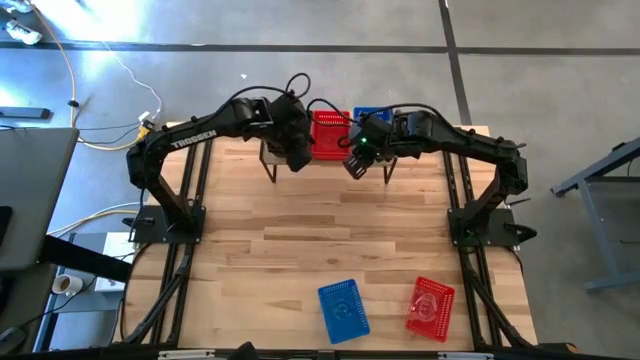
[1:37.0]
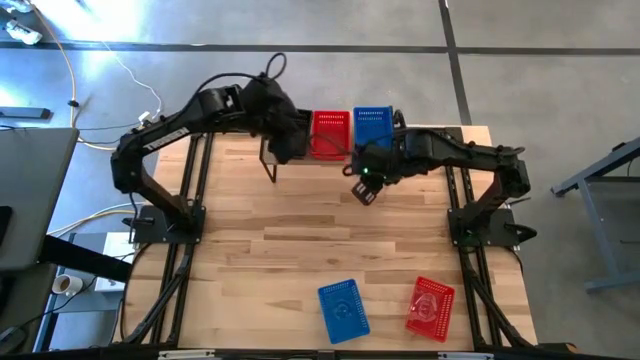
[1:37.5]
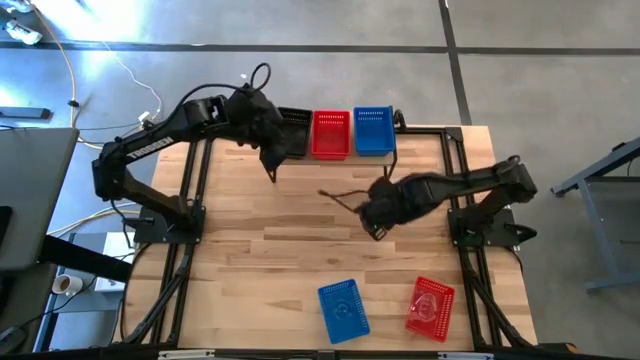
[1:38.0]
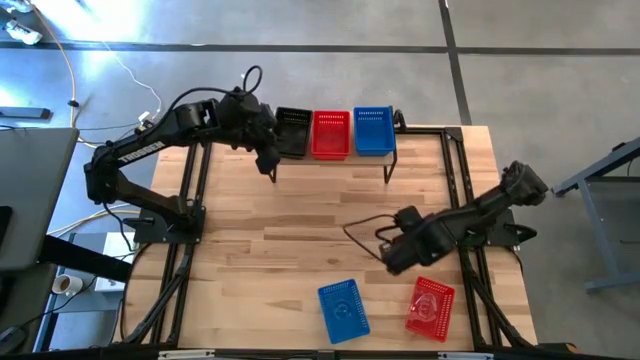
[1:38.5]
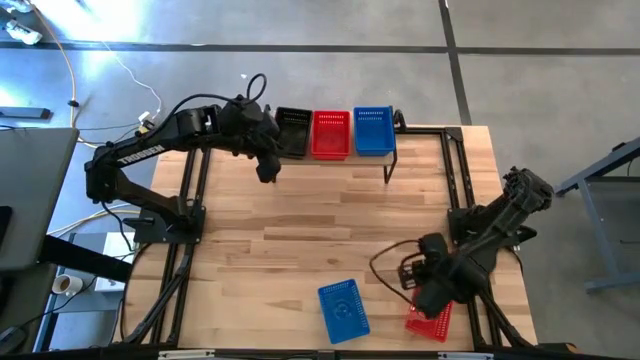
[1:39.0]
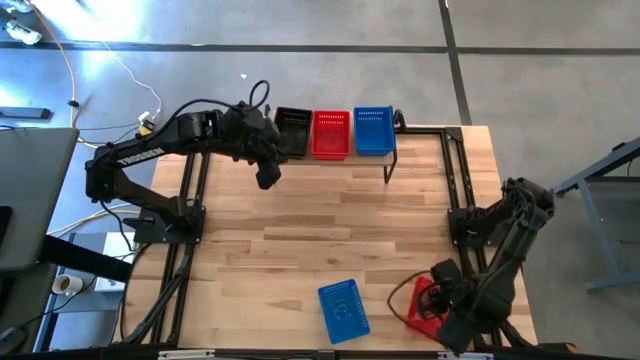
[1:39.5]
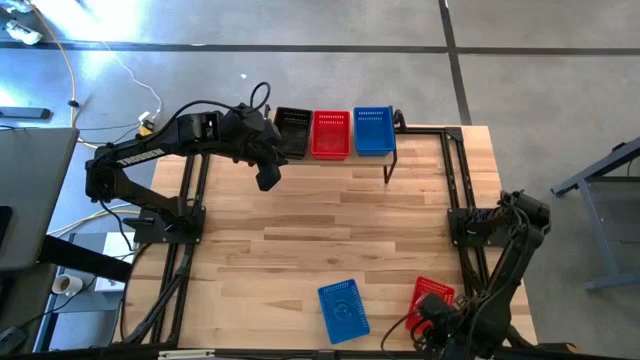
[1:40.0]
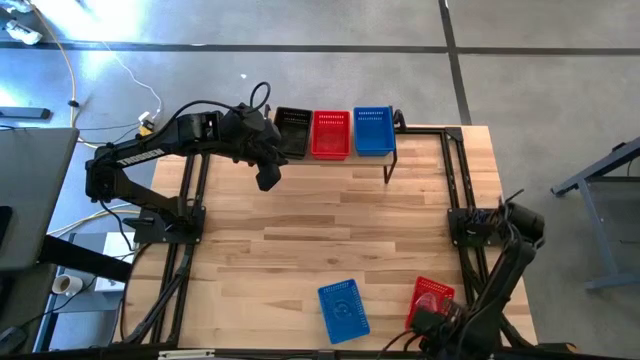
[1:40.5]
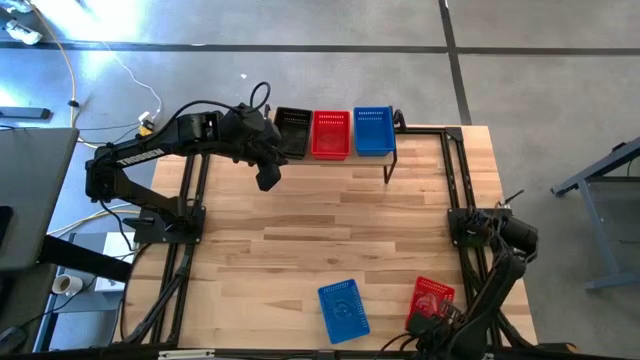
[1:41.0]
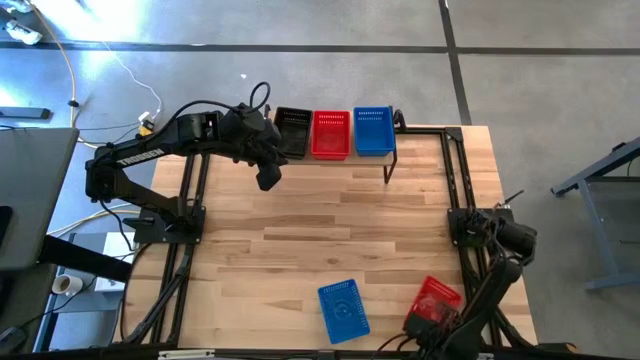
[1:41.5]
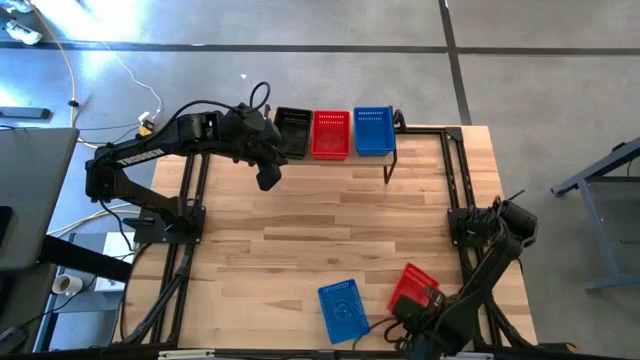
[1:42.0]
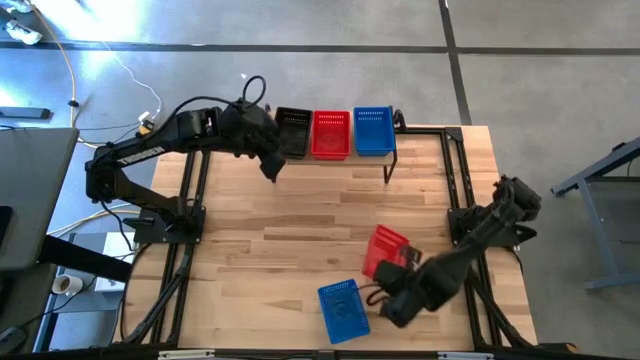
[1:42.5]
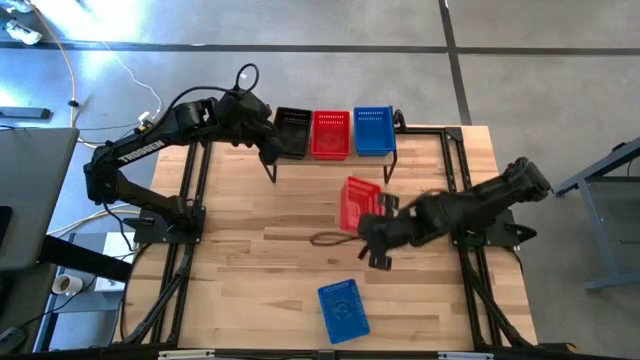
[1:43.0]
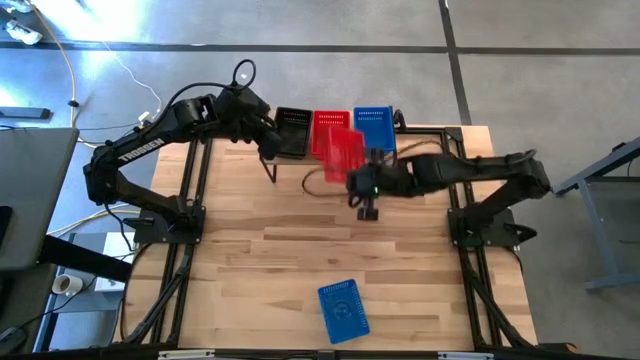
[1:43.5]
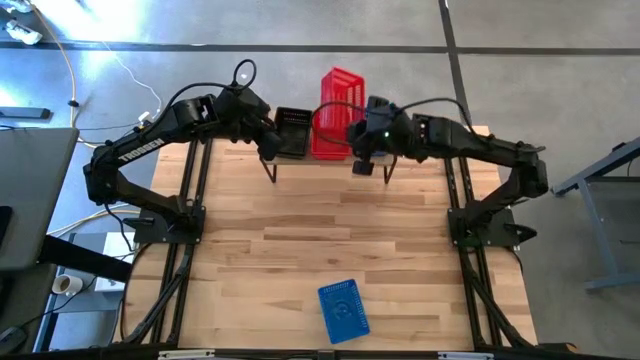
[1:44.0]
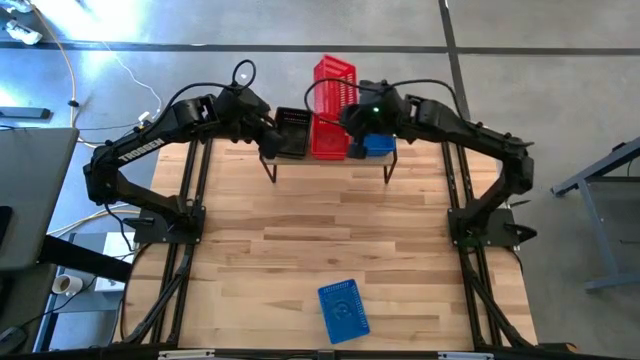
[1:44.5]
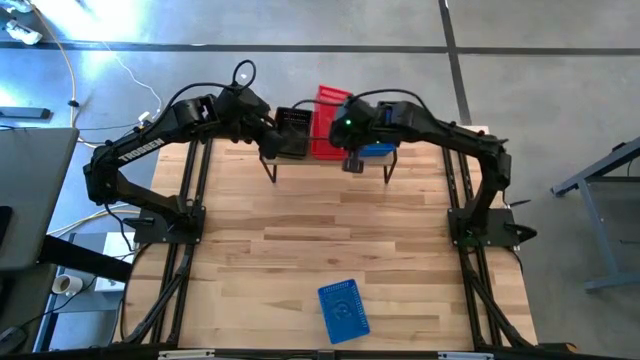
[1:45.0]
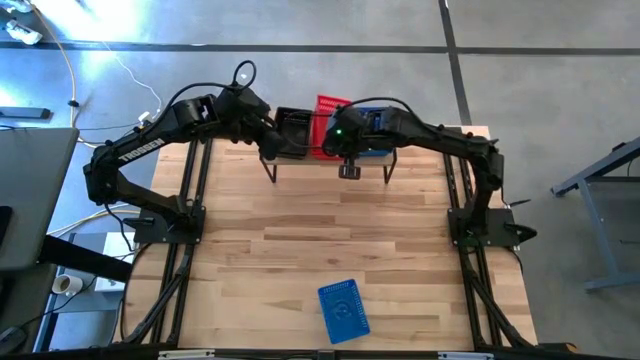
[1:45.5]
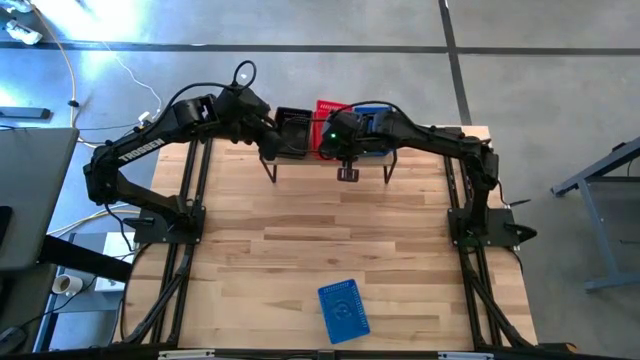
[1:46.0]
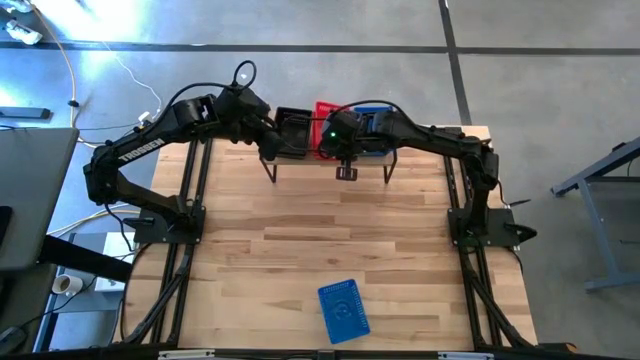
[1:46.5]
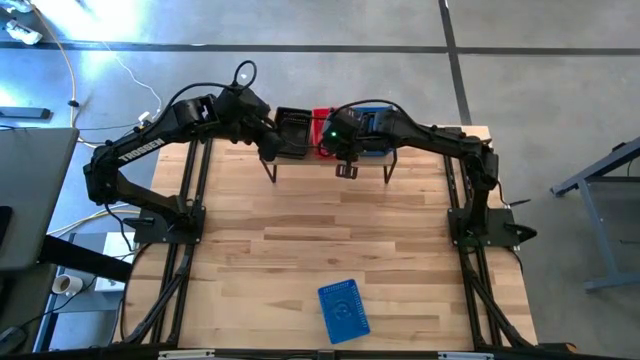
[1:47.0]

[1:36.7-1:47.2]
Task: Stack baskets on shelf by color
Stack the red bin on top of the red bins on the shelf

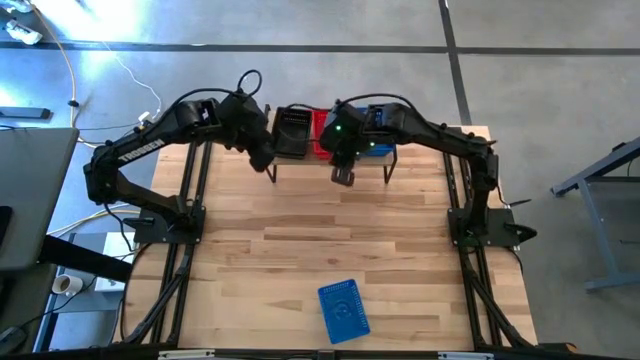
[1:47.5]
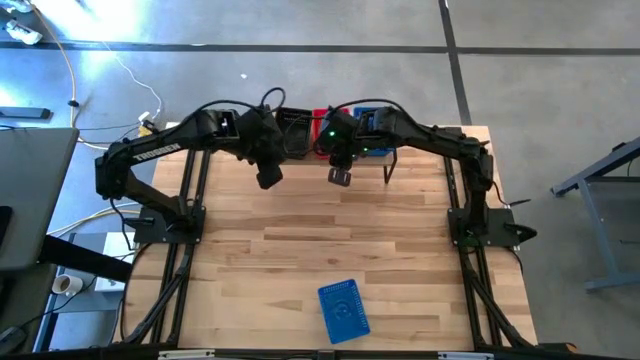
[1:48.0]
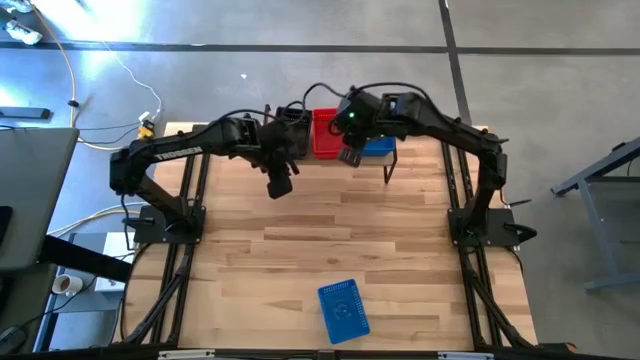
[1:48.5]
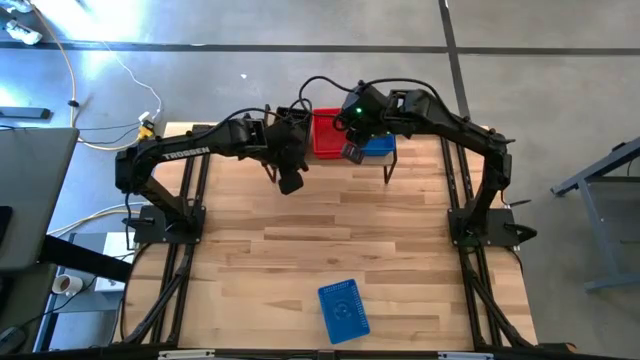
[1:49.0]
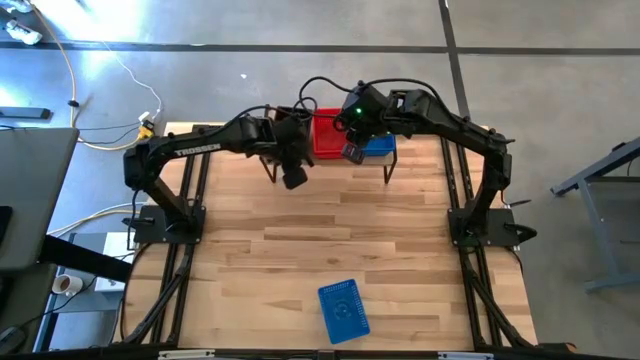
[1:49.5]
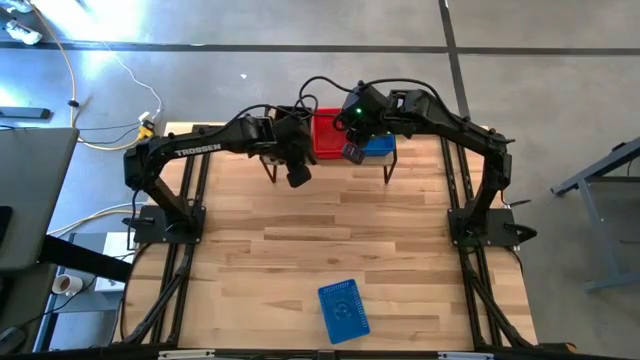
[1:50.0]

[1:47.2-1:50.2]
Adjust the black bins on the shelf

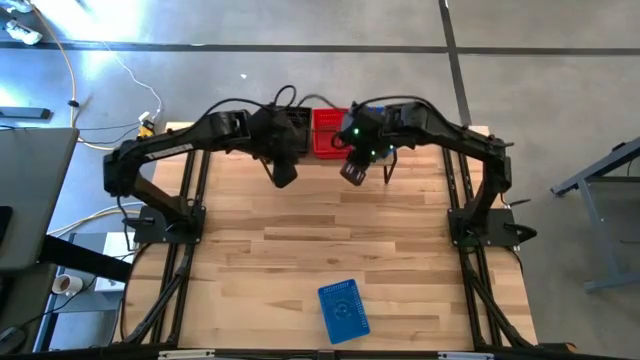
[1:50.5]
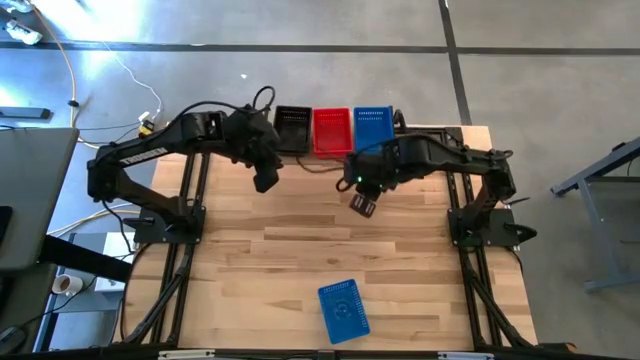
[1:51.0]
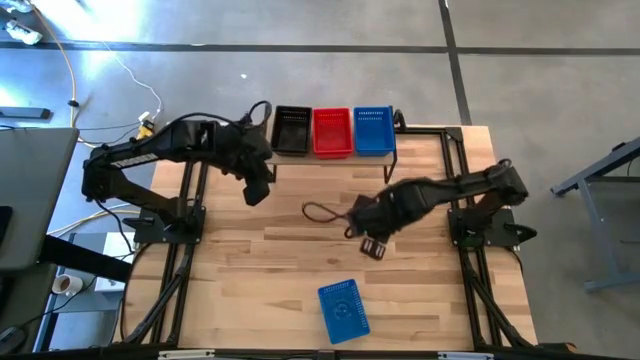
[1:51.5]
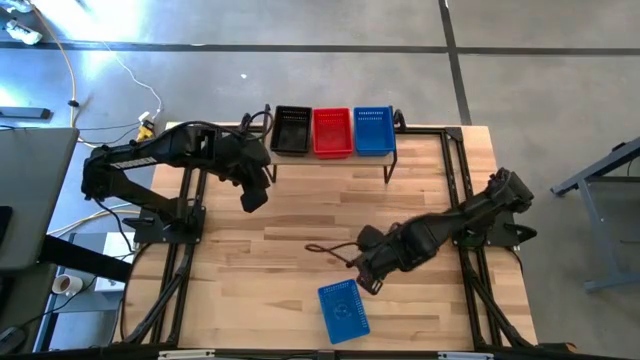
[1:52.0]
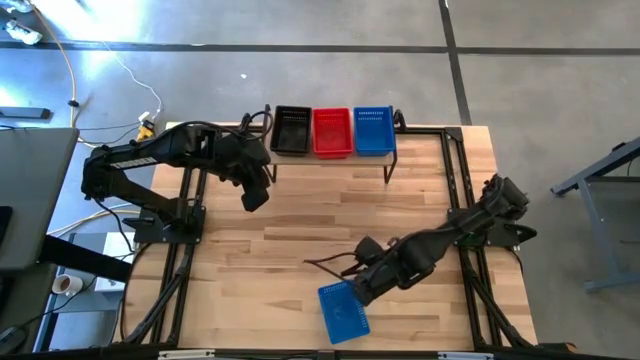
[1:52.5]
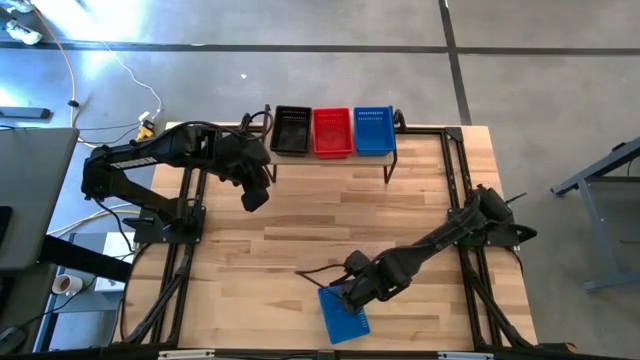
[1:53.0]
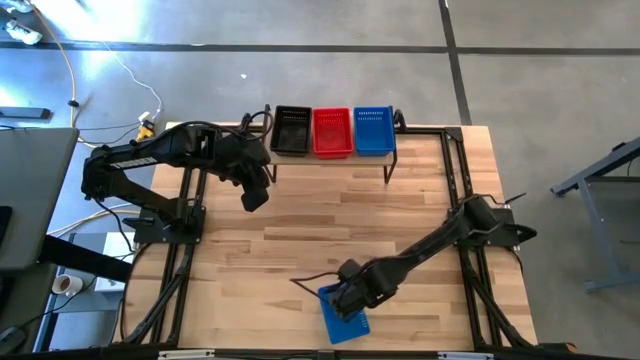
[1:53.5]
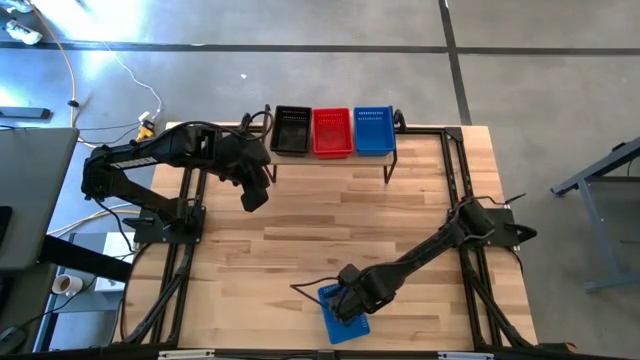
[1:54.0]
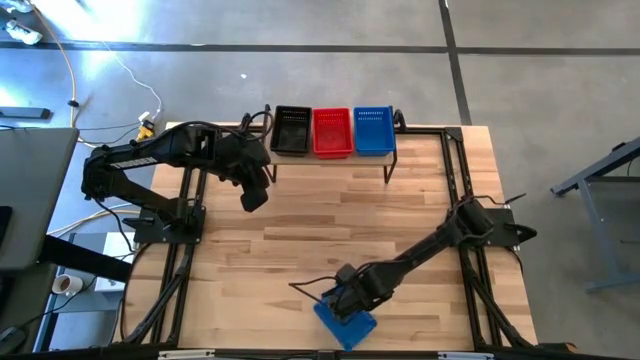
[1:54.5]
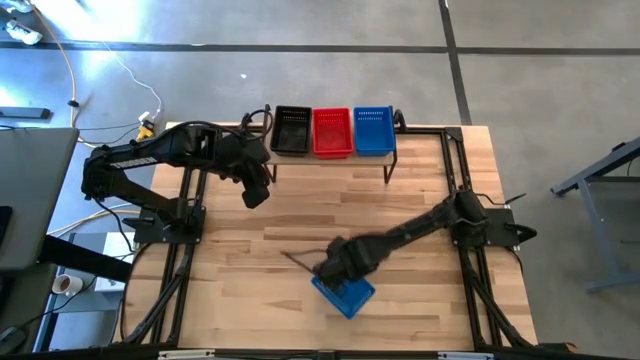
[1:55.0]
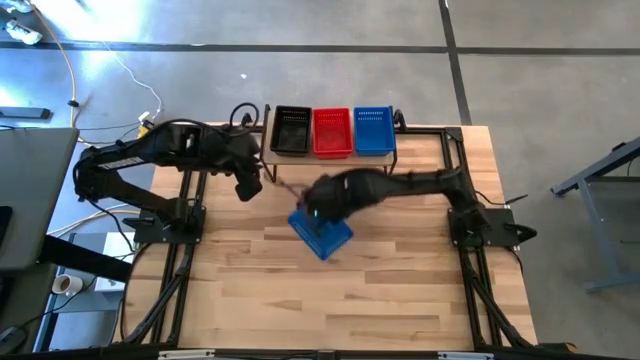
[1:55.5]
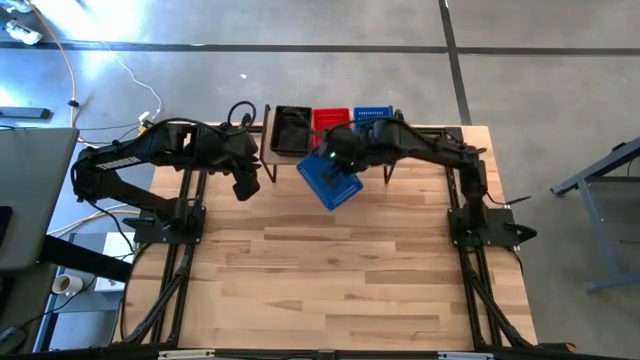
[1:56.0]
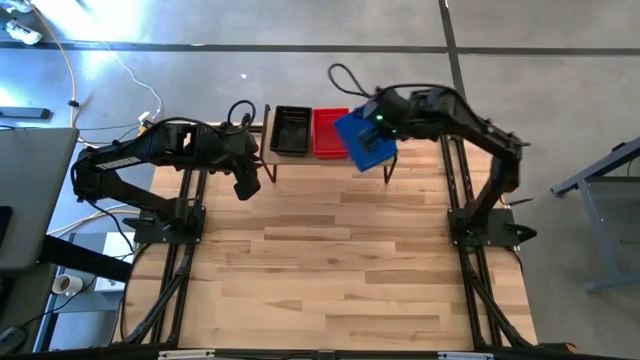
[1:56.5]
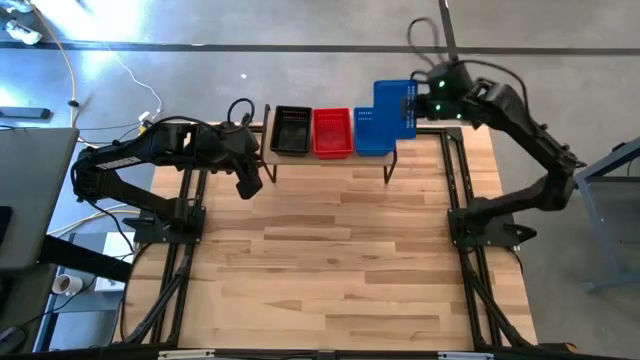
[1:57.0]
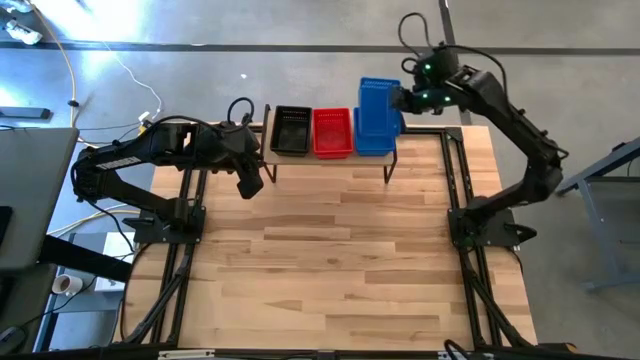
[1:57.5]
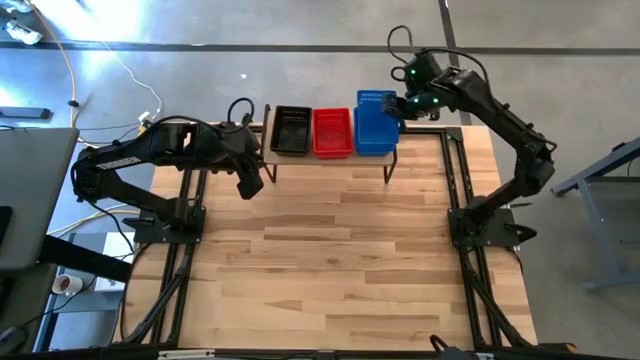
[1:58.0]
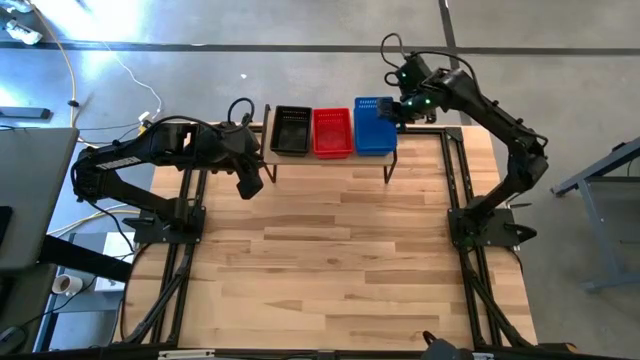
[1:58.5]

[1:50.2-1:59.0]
Stack the blue bin on top of the blue bins on the shelf
